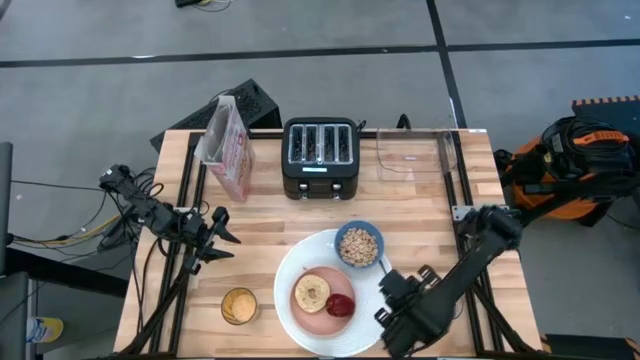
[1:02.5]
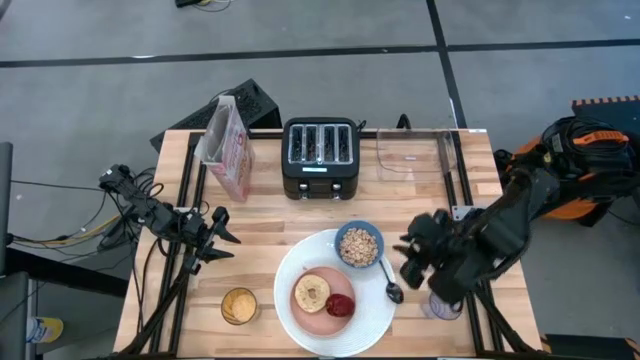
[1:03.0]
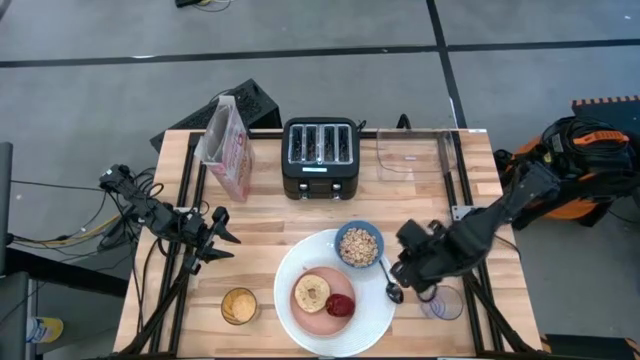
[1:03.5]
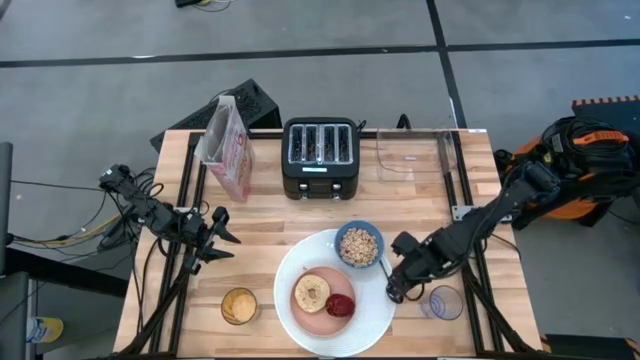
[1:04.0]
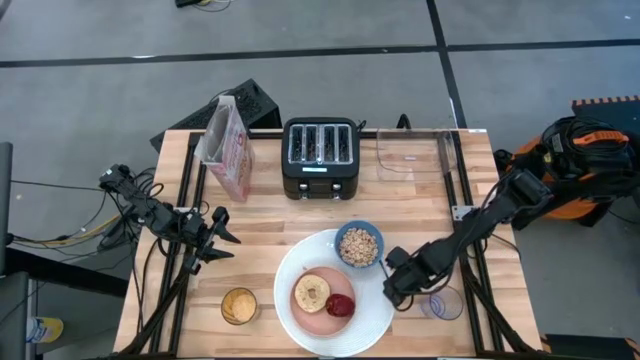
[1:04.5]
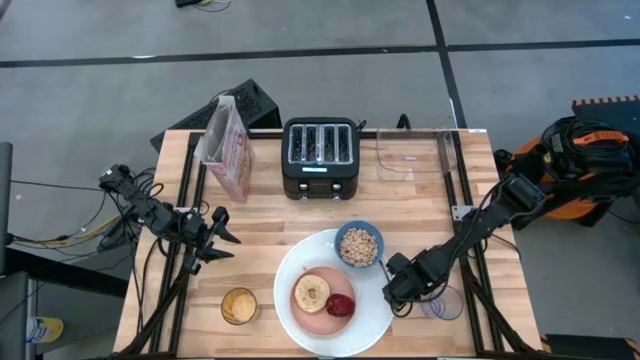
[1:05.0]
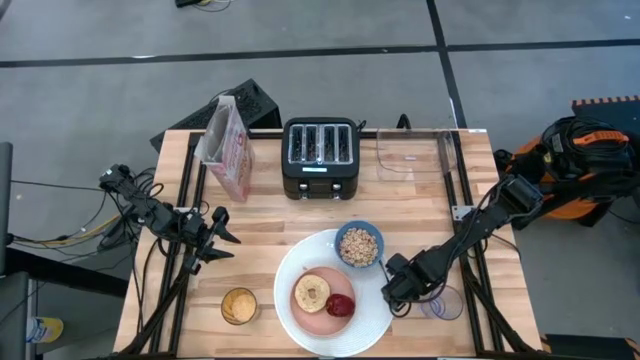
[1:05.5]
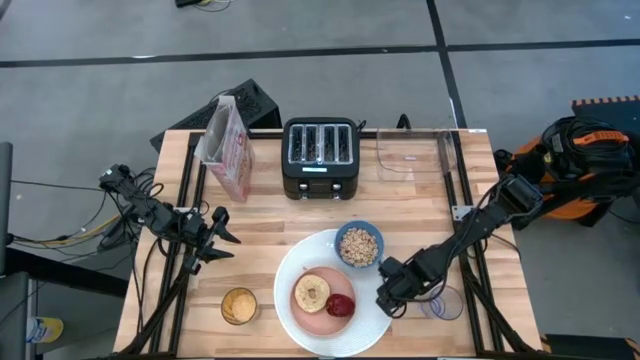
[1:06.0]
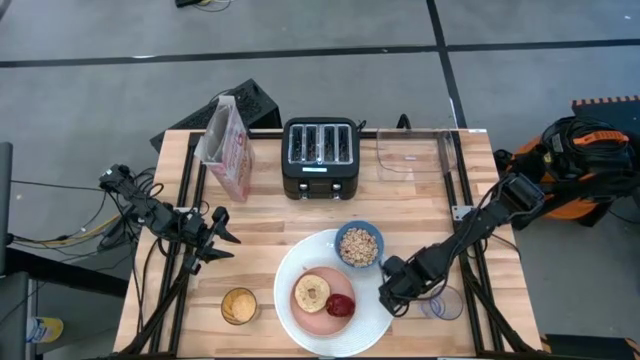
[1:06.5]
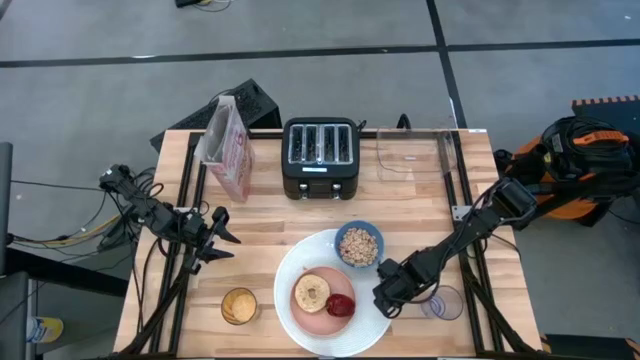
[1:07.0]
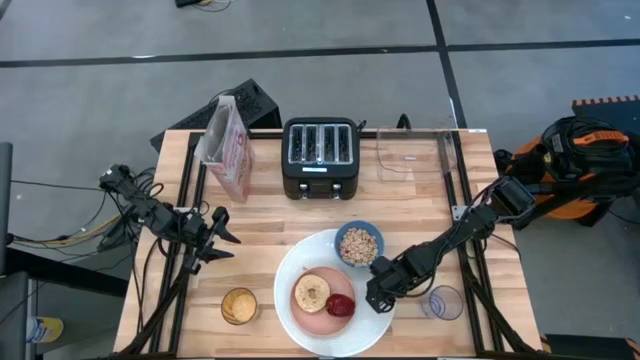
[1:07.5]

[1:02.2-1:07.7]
Task: Arrange a breakfast setting
Adjust the silver spoon on the white table mat

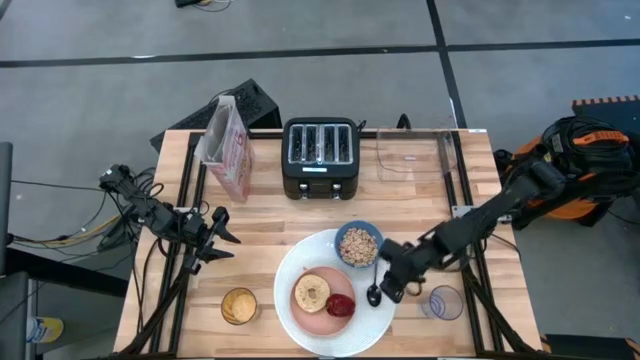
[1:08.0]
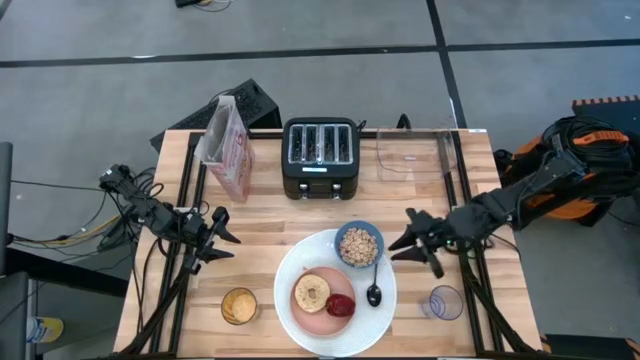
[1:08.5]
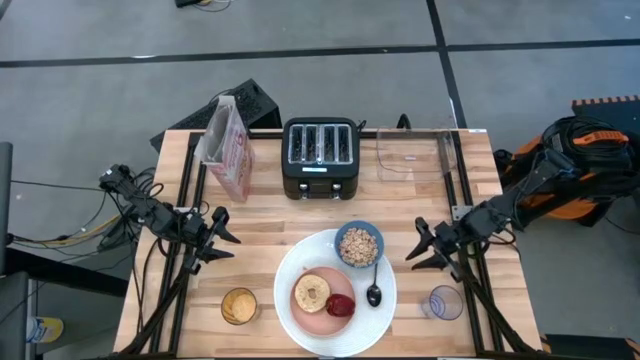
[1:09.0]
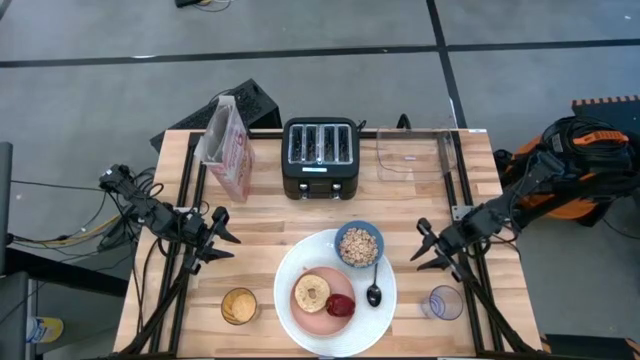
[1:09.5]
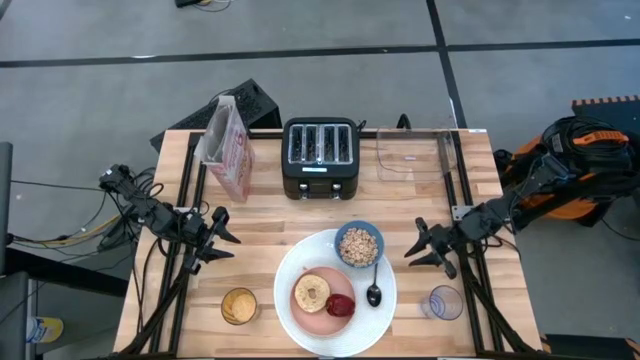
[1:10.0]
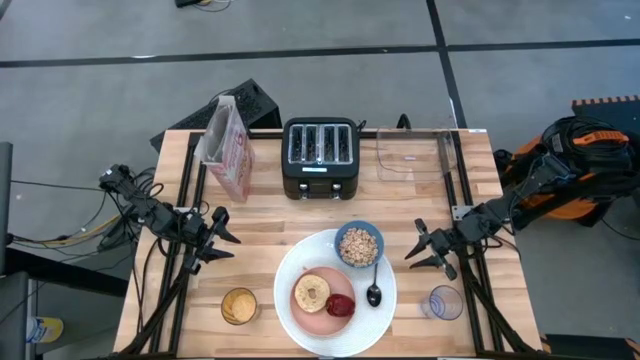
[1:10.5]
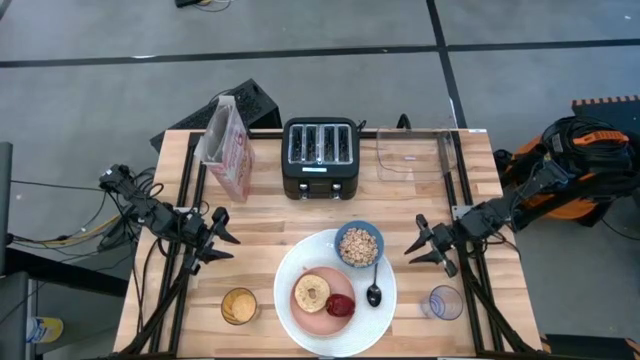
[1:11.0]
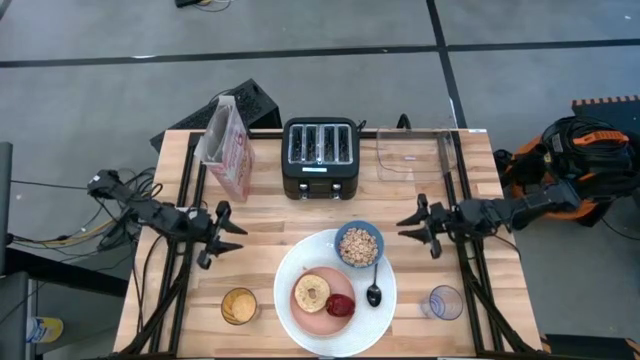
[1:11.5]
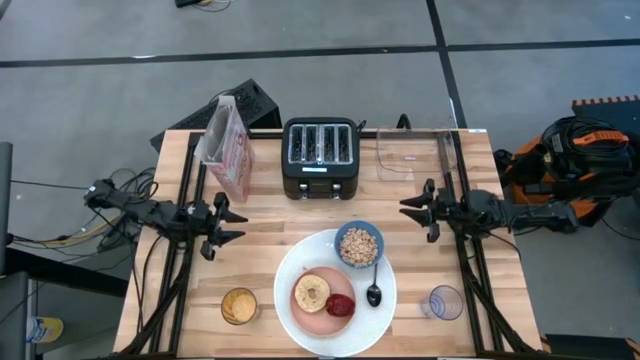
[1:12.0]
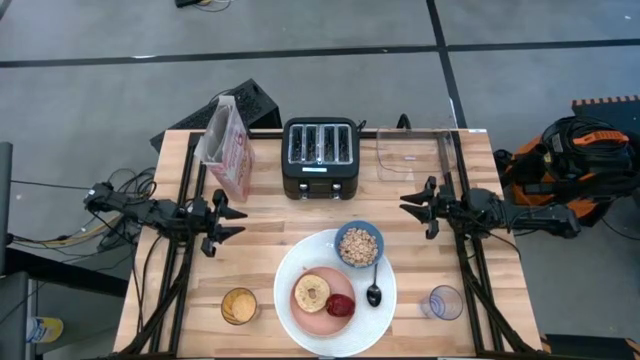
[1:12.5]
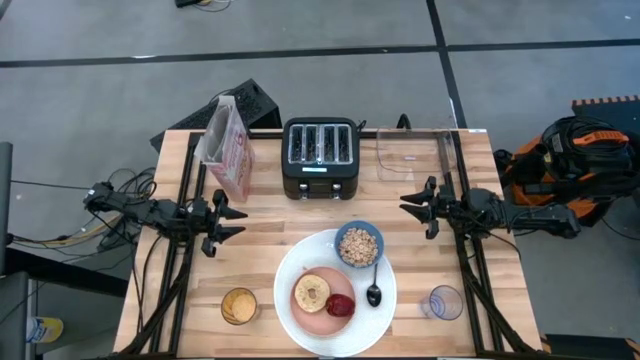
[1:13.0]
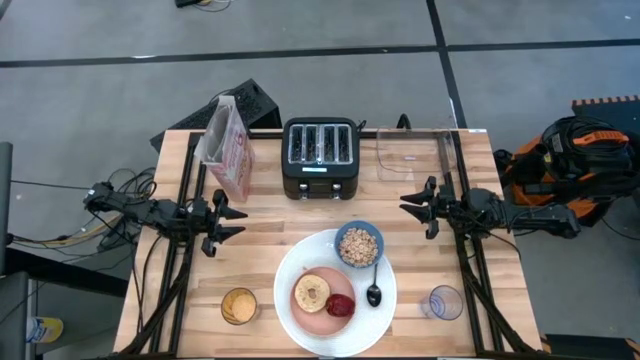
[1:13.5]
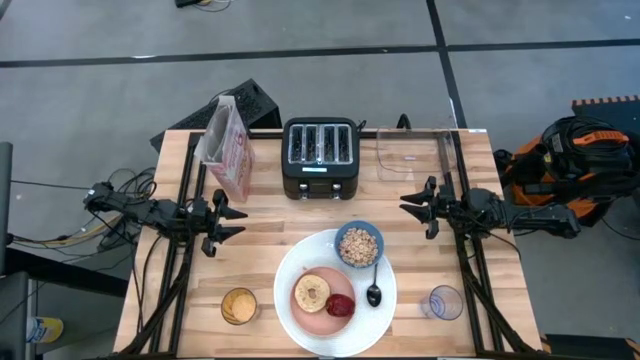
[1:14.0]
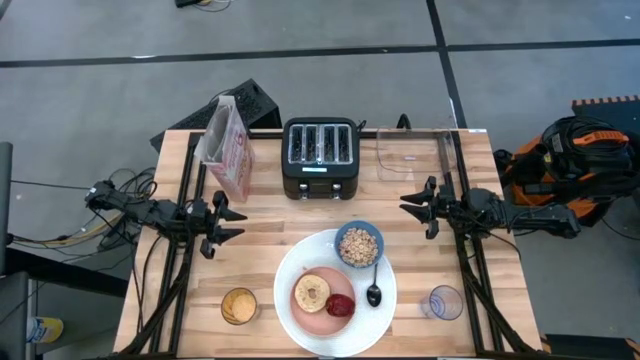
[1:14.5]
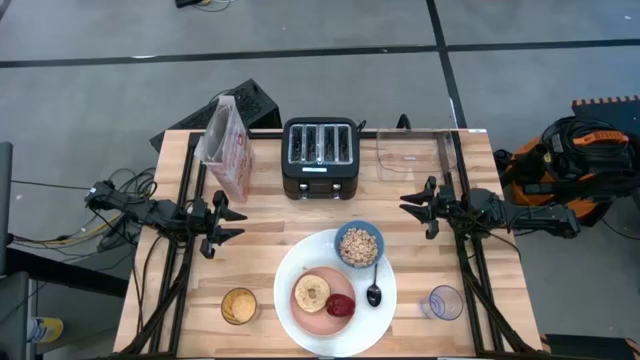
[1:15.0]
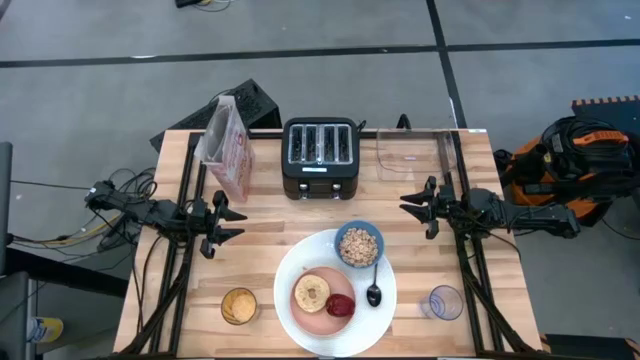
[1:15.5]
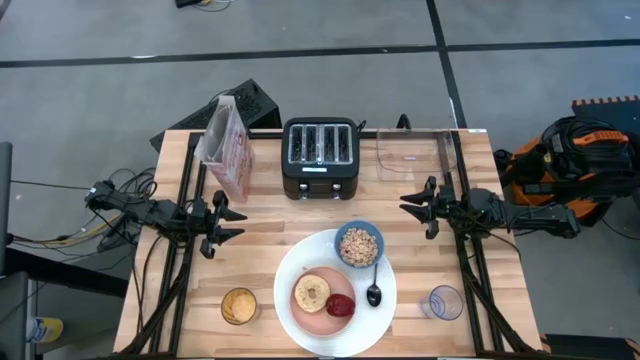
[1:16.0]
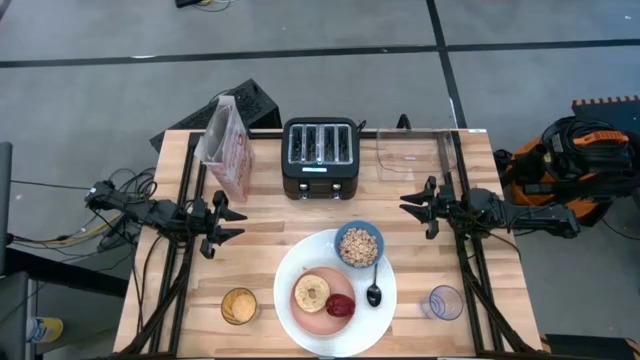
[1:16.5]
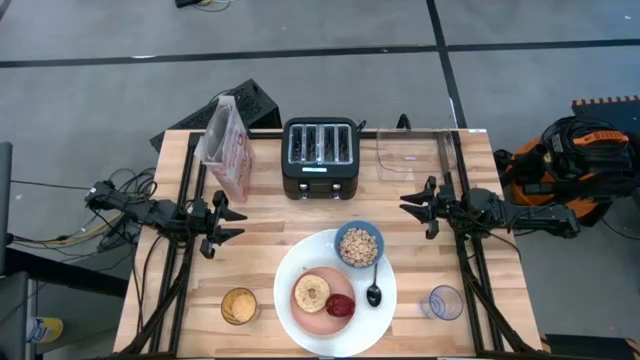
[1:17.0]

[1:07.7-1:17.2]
Return to Home Position

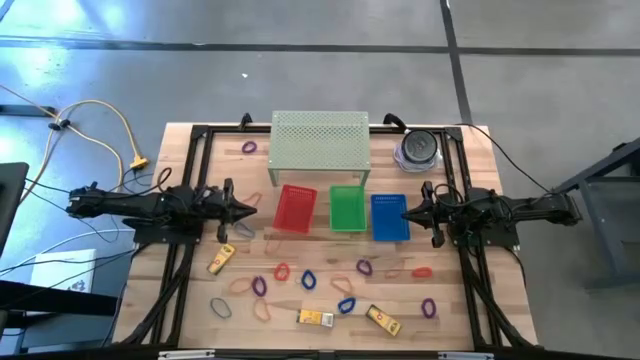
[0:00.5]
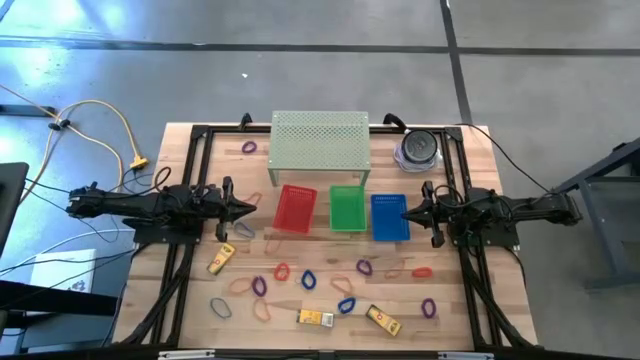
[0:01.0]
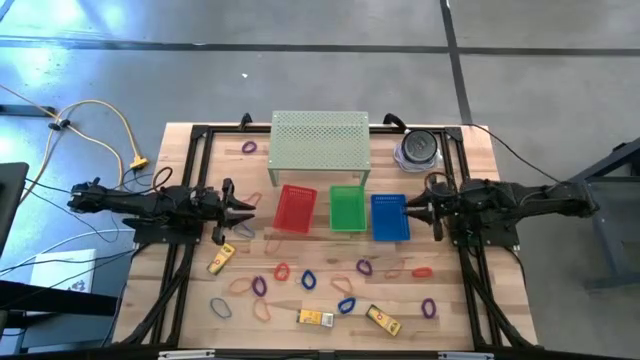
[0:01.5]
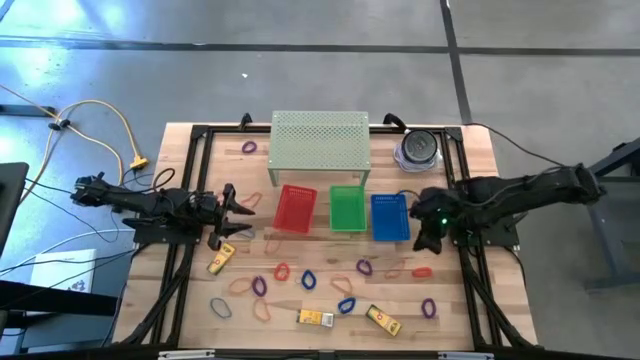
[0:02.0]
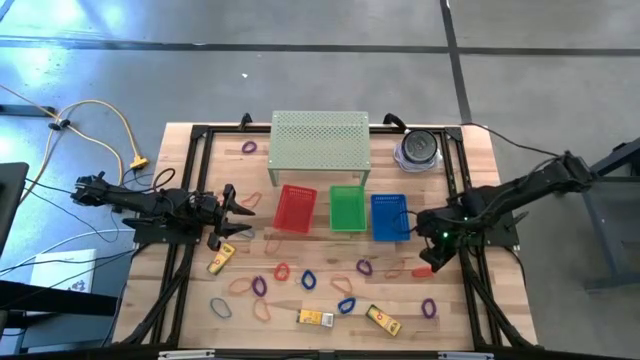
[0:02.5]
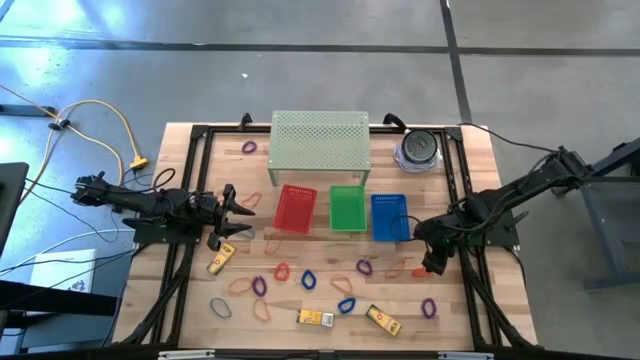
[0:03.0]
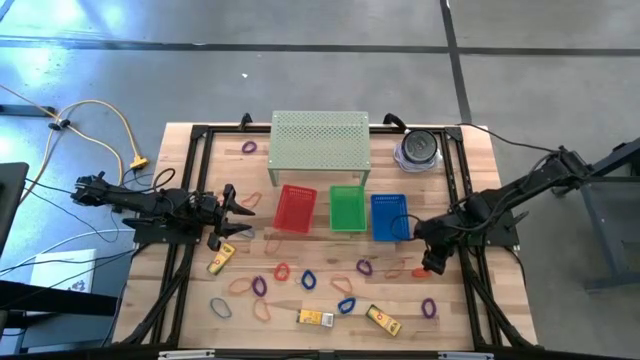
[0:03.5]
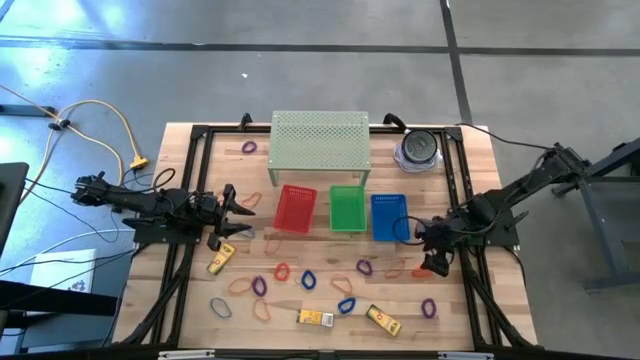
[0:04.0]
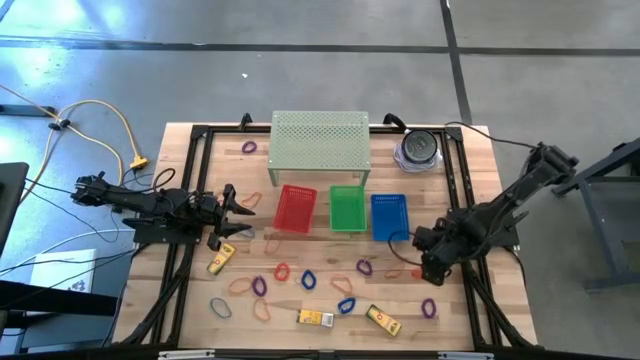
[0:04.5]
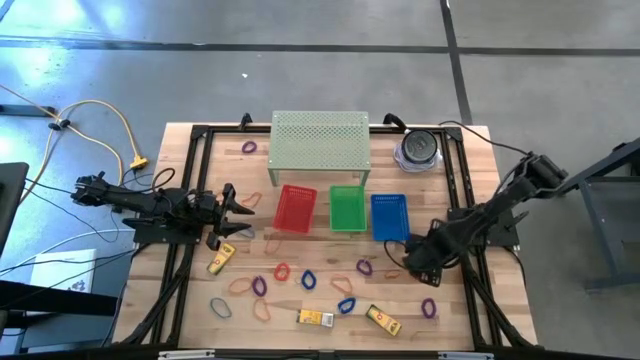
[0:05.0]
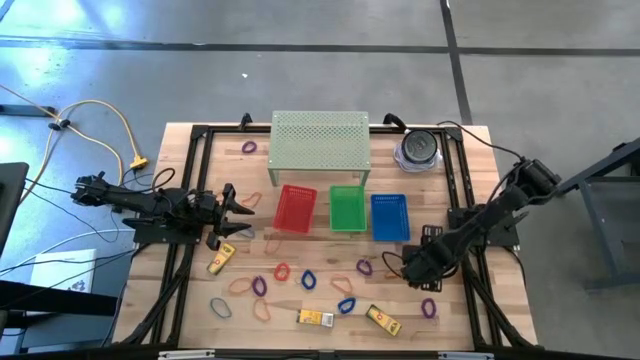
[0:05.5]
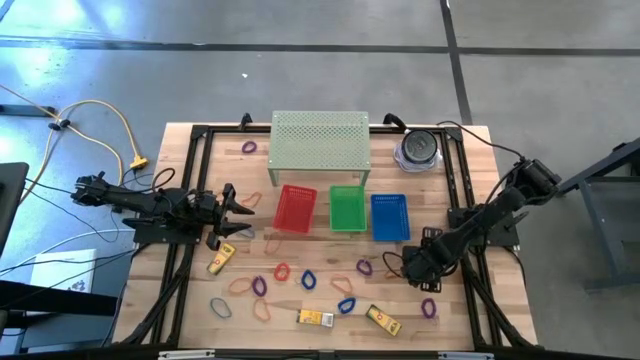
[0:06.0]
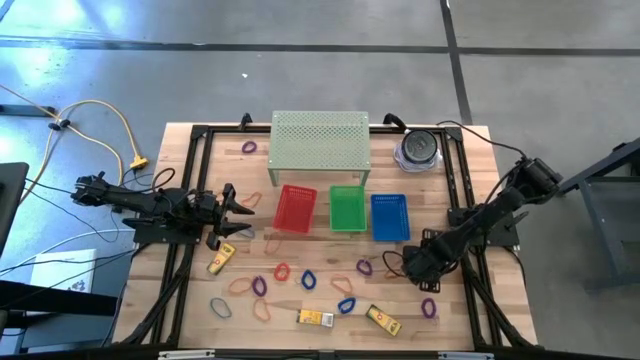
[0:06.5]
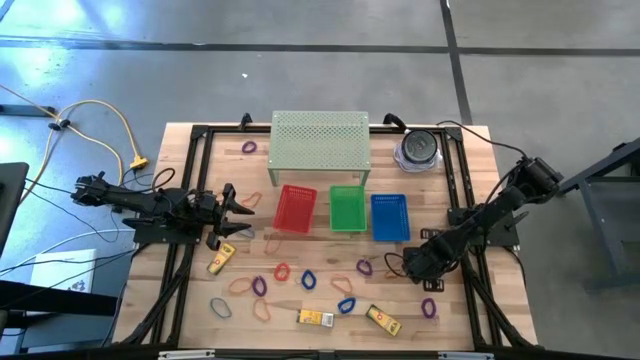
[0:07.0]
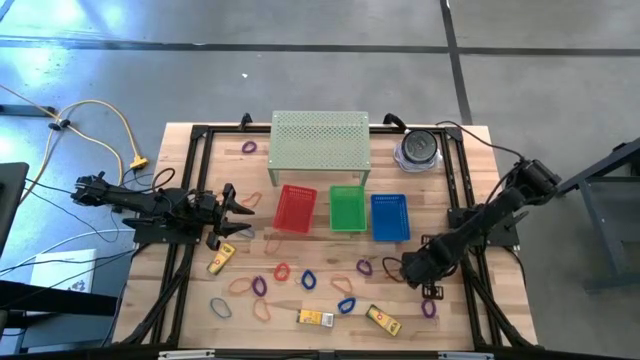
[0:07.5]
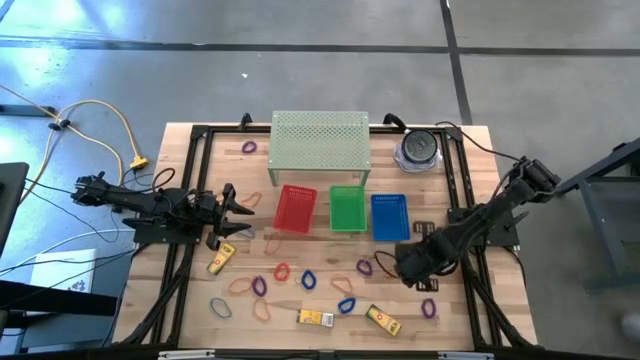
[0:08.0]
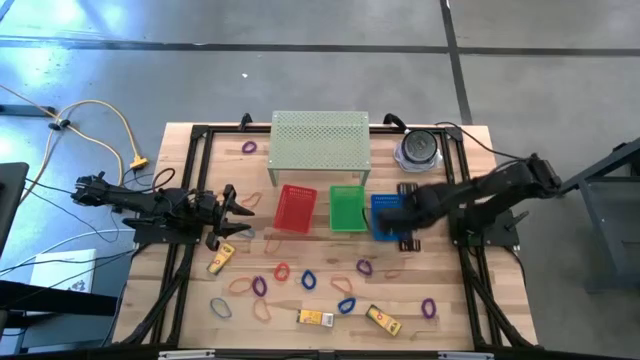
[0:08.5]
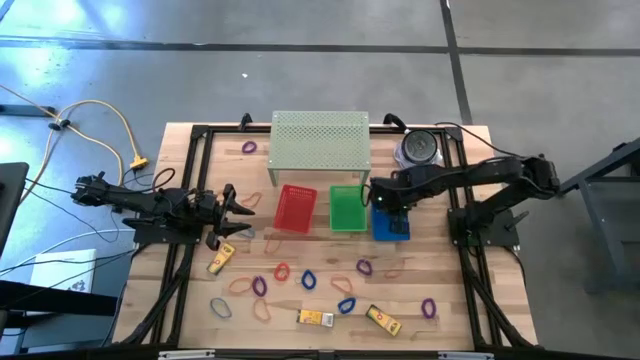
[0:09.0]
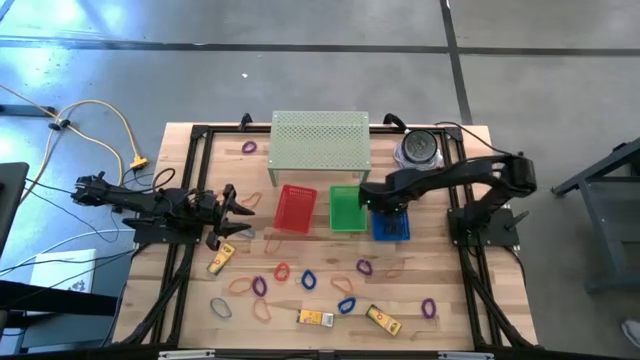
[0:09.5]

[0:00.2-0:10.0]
Task: Pick & Place Office Desk Supplies
Put the right orange spring keychain into the blue bin
